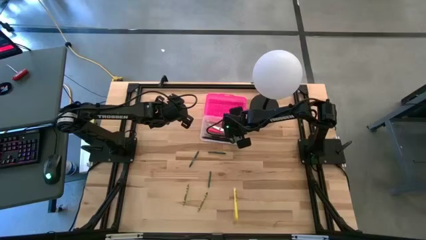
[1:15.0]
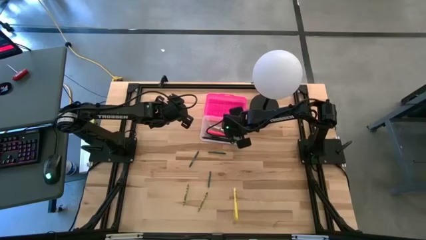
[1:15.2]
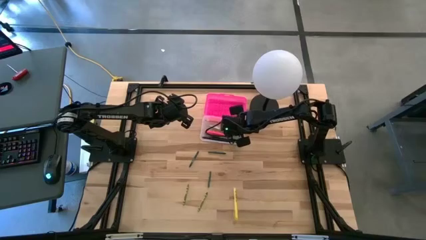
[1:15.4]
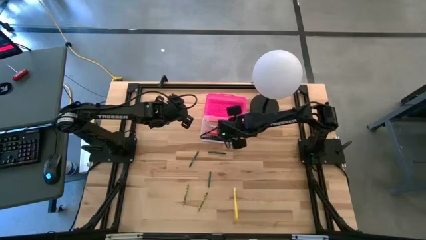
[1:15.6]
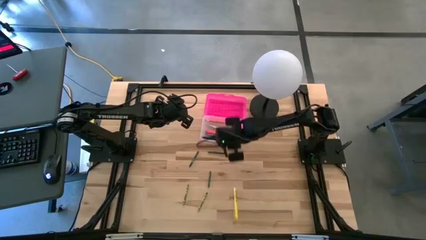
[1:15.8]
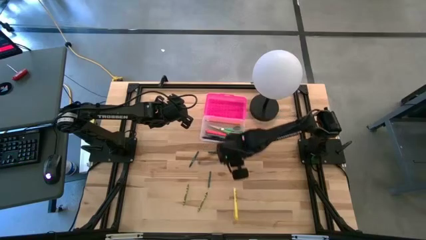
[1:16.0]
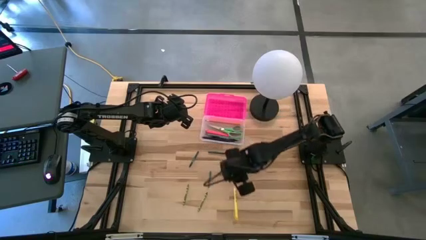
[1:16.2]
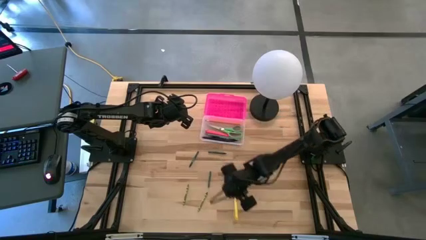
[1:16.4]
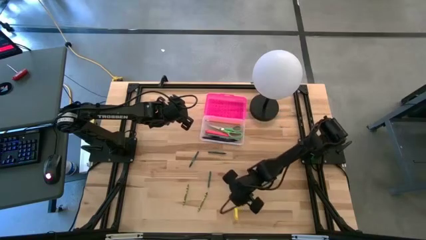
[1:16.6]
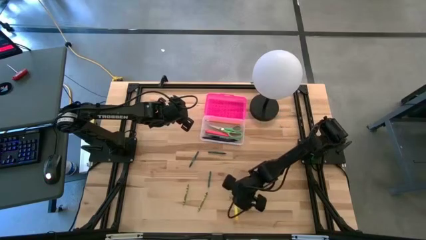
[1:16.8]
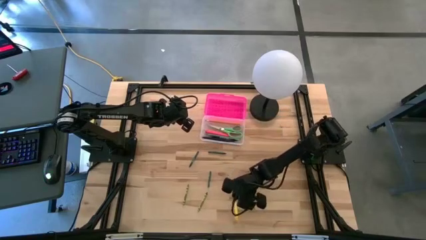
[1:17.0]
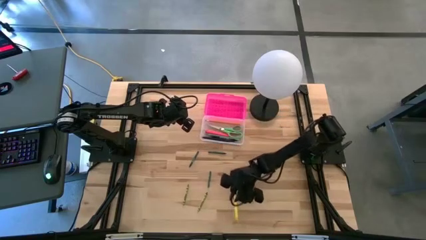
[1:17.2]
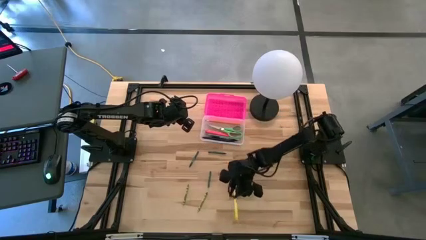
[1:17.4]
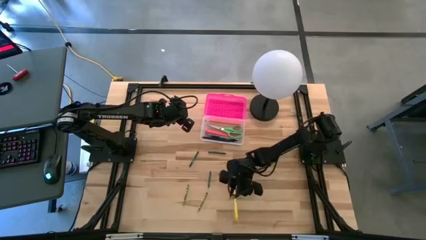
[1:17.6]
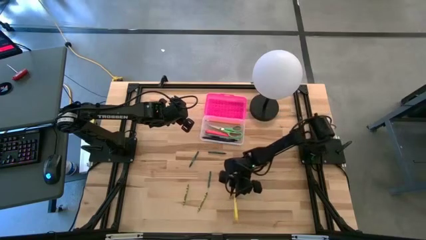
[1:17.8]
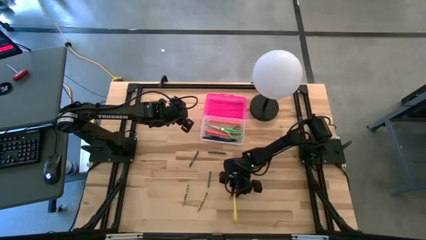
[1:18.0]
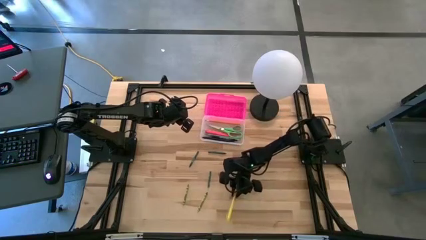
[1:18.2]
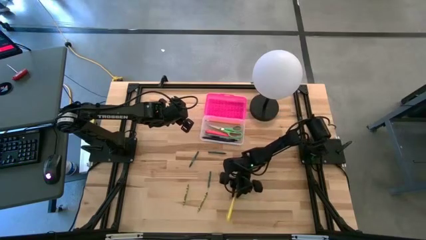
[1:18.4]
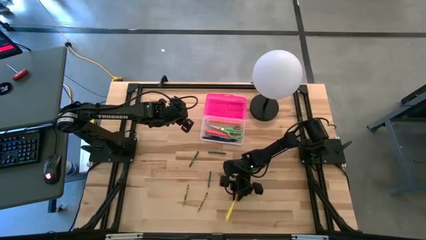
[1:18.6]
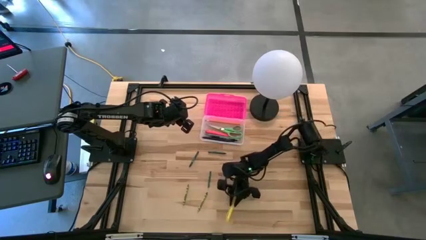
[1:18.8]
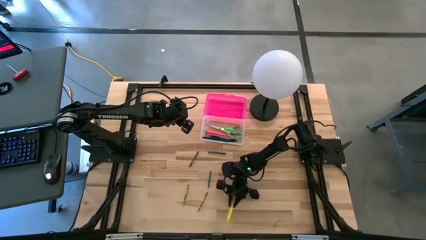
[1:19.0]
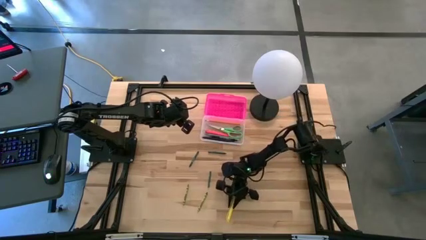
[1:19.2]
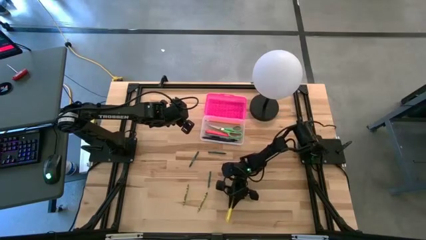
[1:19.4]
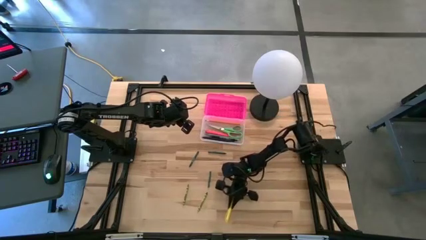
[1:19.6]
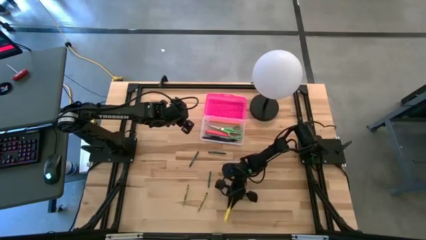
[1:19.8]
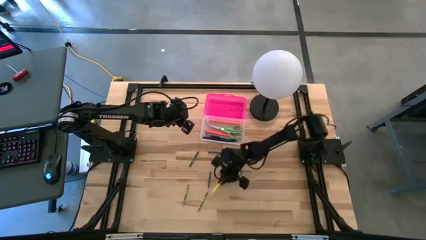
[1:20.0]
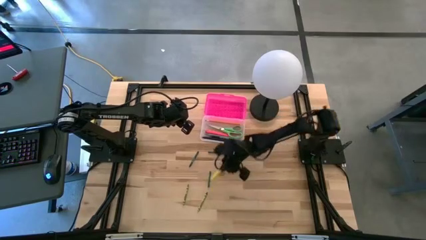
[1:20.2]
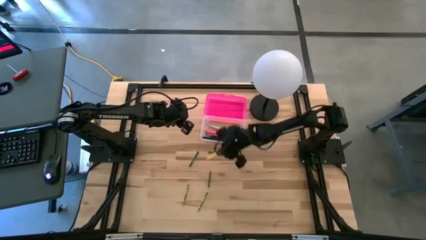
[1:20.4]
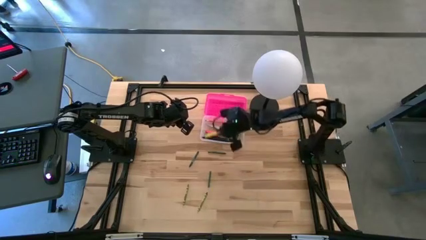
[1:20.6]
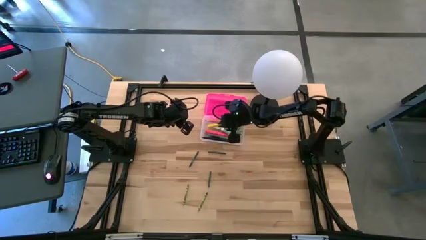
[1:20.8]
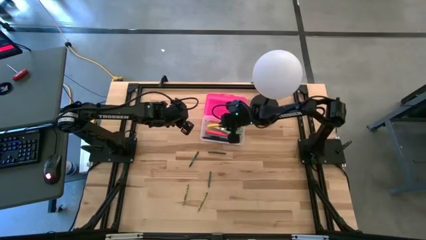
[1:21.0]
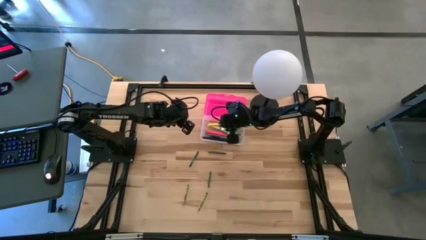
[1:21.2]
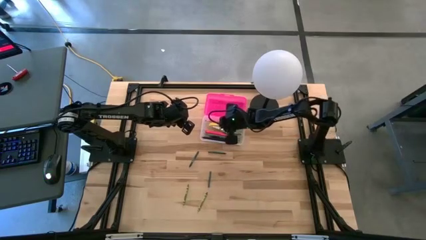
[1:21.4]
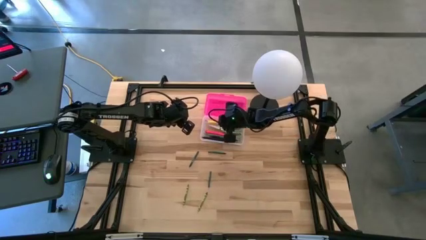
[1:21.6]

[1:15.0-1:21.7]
Task: Pick & place school supplies into a supply box
Put the yellow pen into the transparent supply box

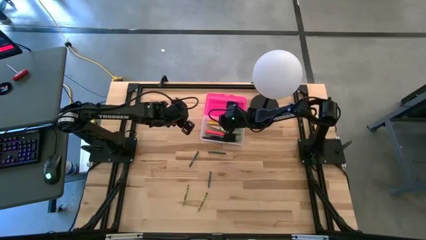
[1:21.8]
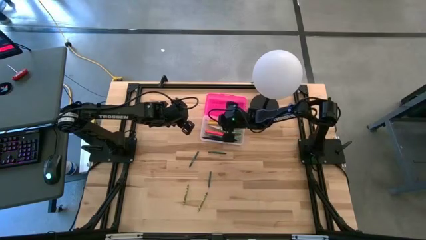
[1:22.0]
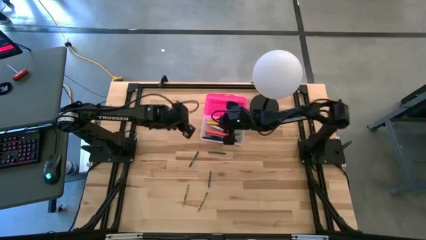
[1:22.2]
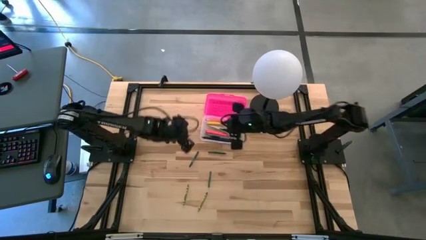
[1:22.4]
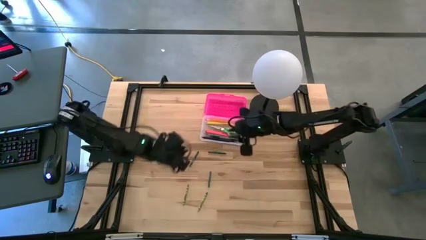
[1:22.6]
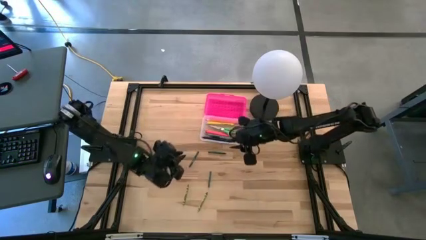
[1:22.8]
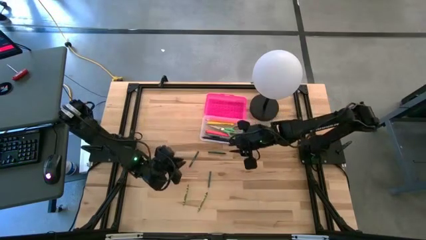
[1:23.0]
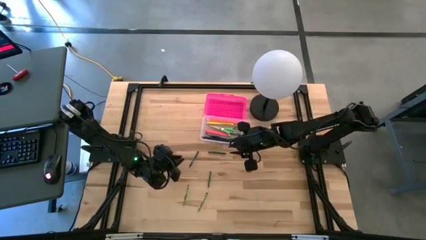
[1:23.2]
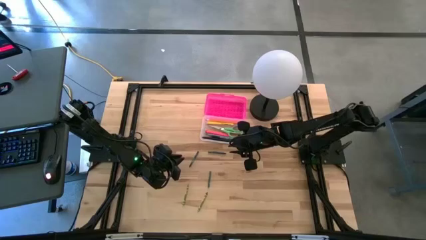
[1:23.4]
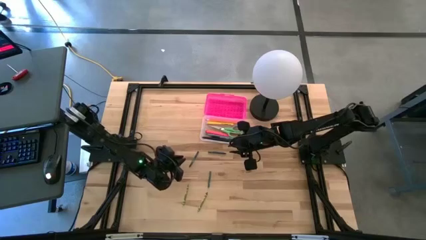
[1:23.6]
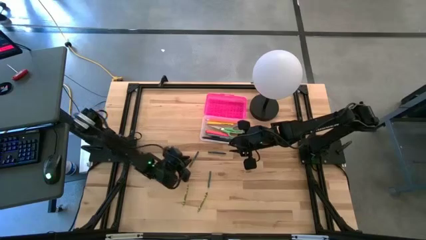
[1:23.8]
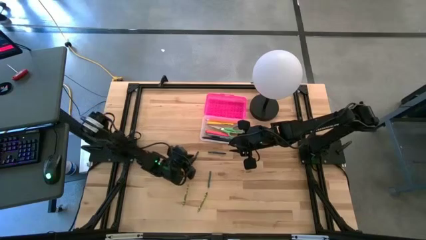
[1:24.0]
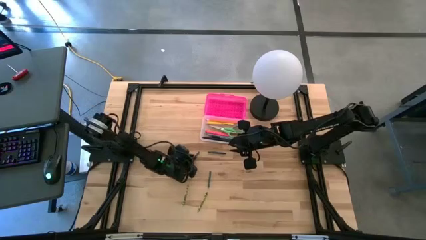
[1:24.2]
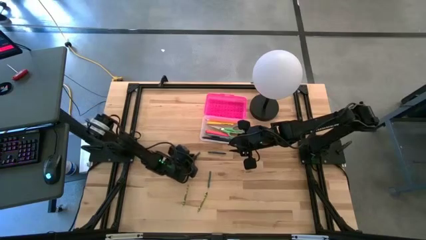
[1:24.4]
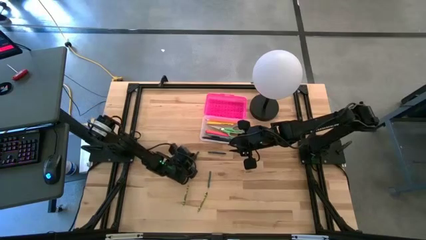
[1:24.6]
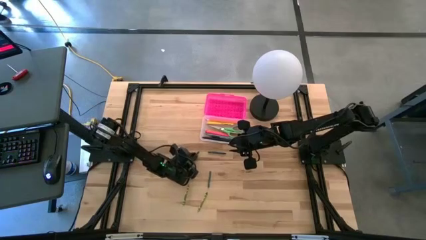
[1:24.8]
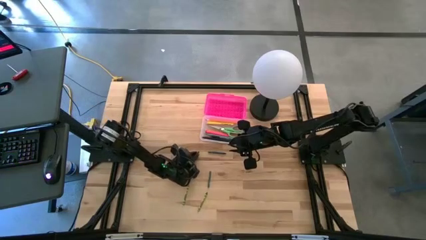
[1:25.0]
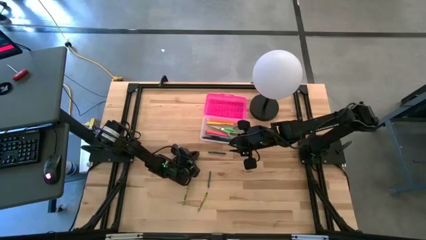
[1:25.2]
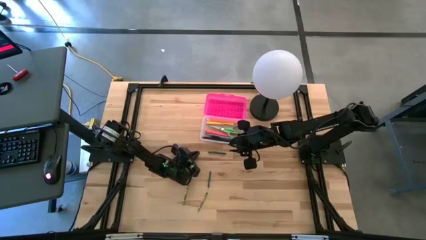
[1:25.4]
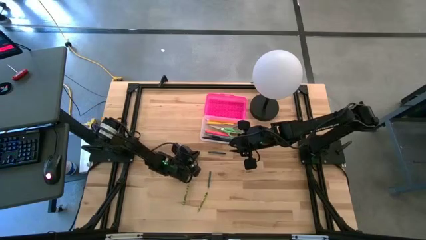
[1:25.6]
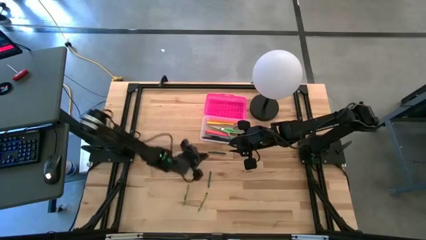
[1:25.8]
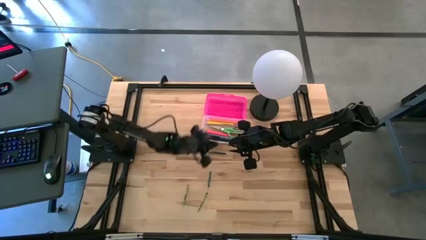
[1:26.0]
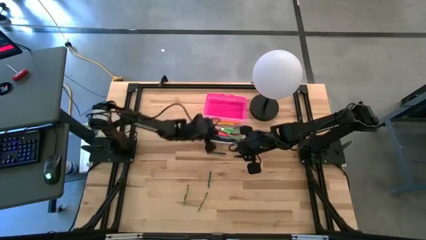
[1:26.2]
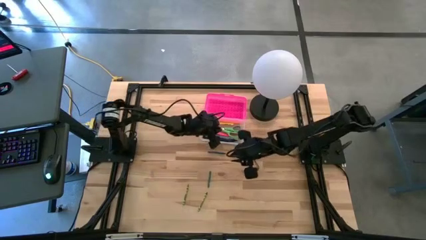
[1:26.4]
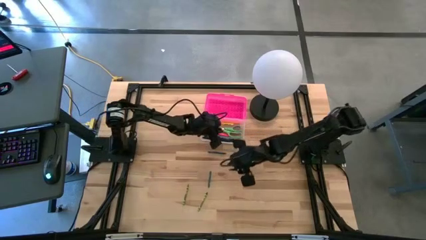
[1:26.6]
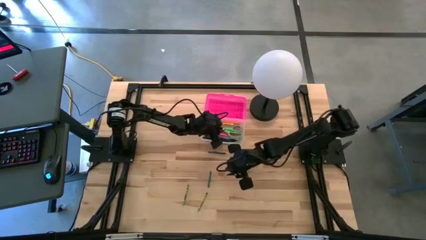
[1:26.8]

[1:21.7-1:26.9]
Put the top left dark green crayon into the transparent supply box

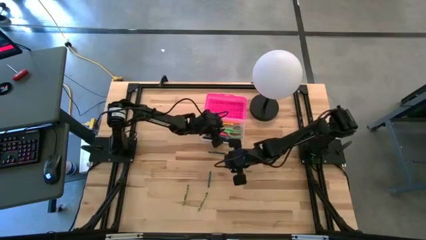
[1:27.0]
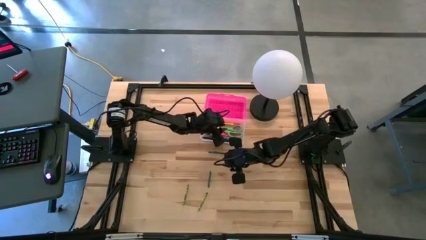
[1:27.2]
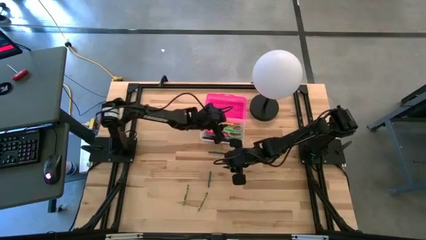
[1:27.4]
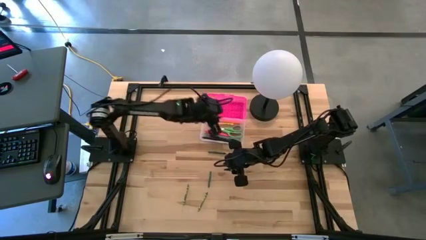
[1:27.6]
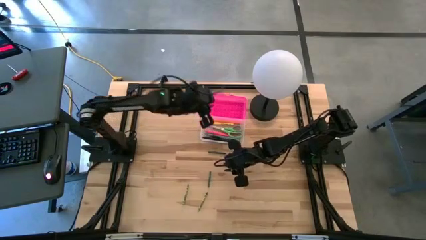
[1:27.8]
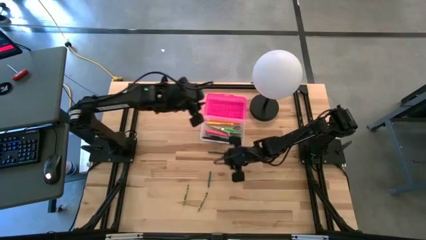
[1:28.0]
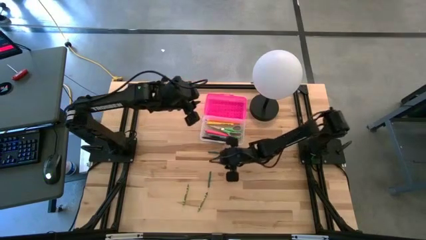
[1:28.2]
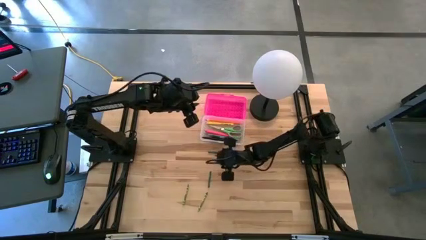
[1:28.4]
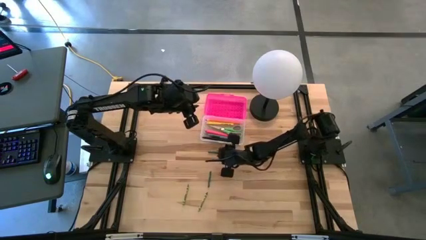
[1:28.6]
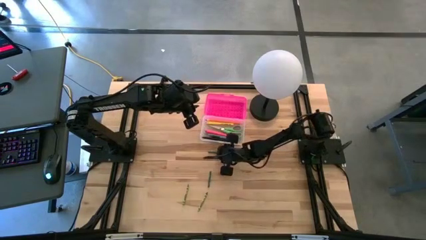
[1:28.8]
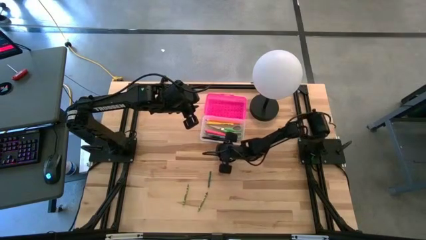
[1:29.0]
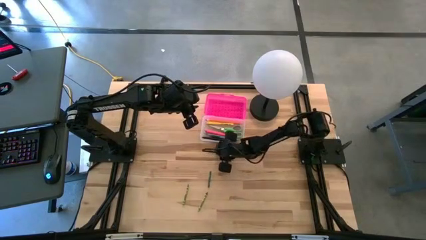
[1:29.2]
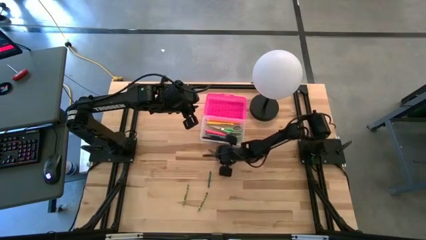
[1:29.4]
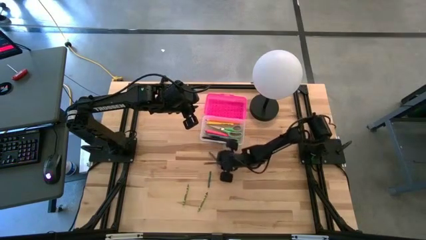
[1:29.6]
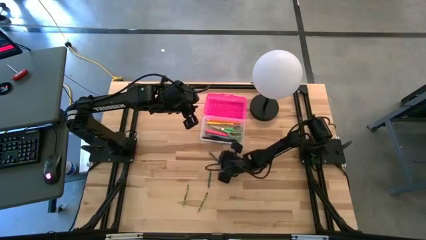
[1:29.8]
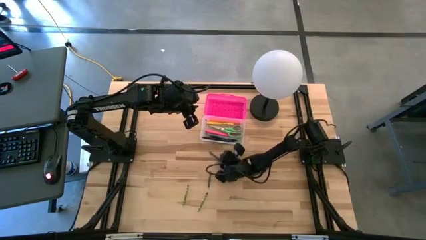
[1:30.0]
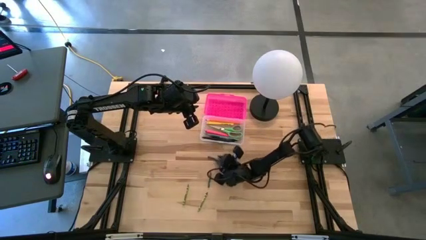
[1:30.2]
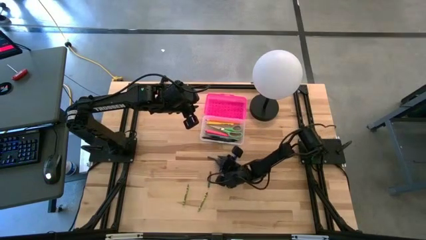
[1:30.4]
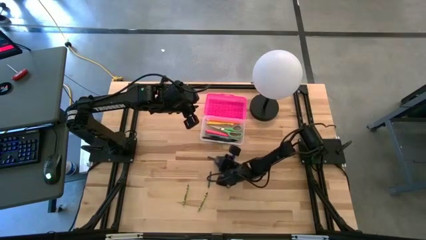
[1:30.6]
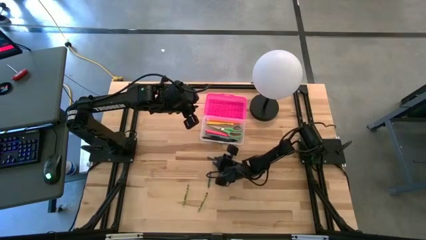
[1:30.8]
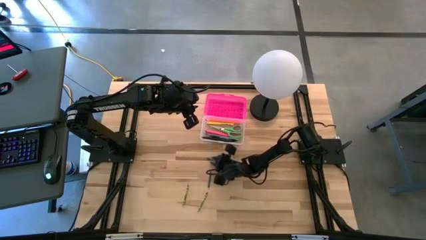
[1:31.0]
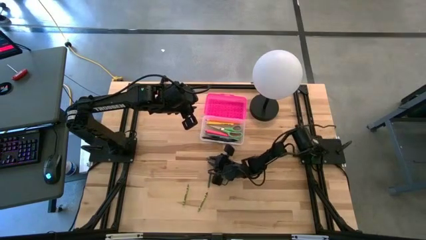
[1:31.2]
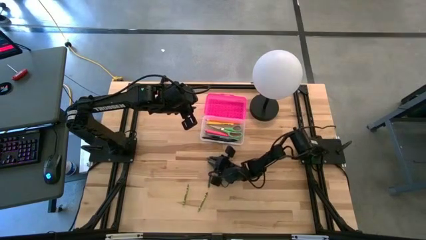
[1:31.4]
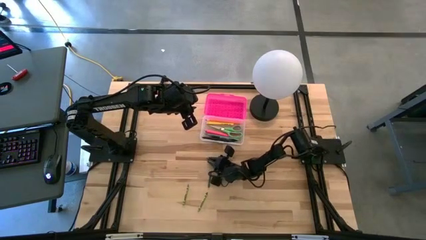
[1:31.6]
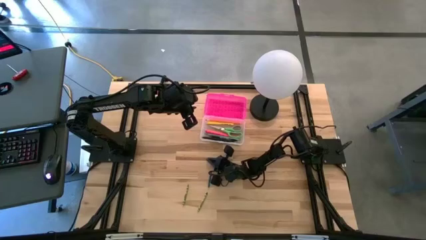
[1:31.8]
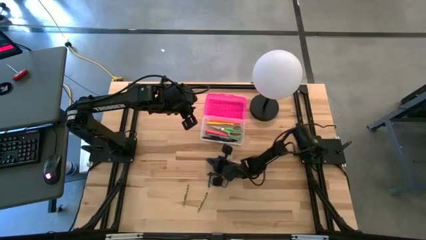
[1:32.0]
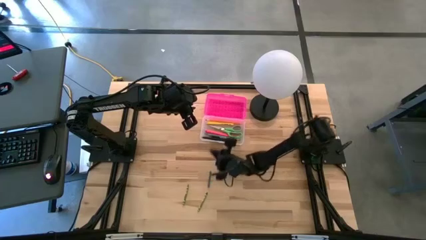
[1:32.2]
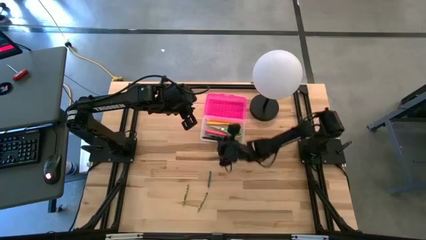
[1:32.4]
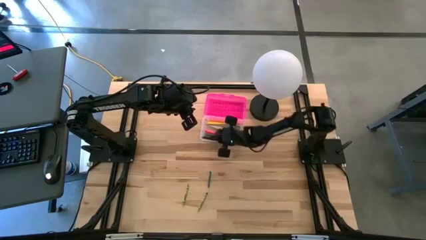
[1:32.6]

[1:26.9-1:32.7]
Put the top dark green crayon into the transparent supply box
